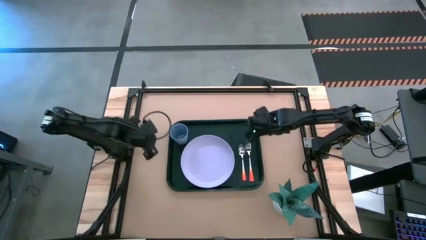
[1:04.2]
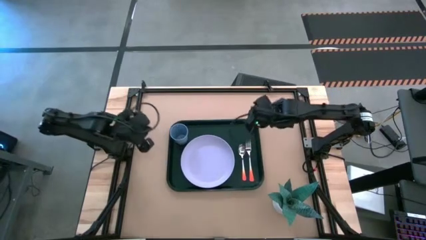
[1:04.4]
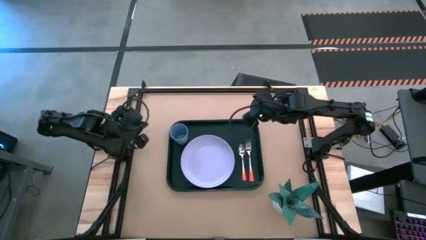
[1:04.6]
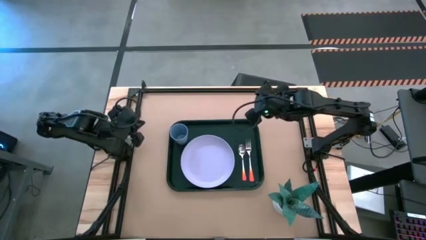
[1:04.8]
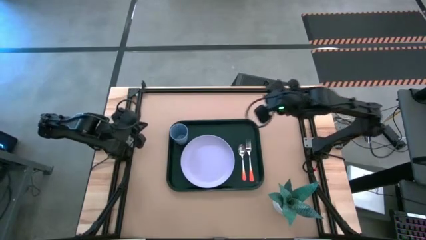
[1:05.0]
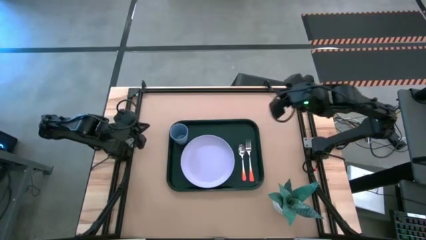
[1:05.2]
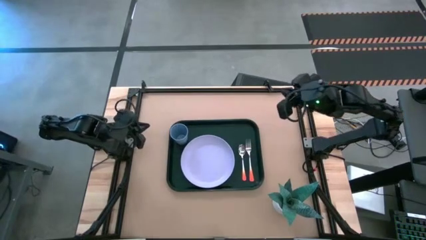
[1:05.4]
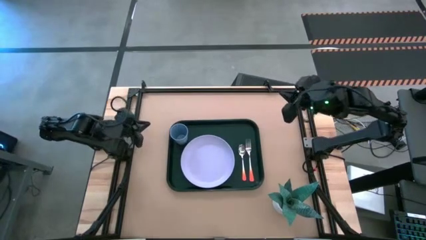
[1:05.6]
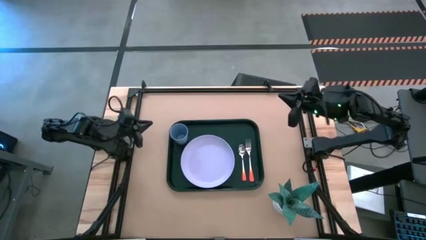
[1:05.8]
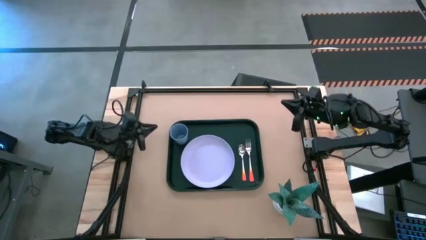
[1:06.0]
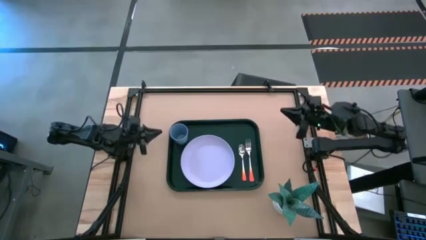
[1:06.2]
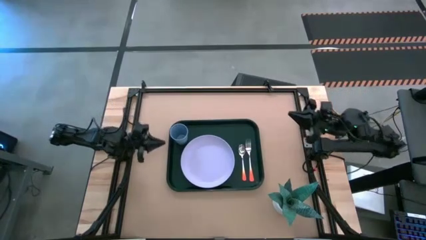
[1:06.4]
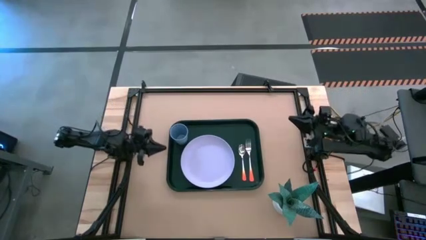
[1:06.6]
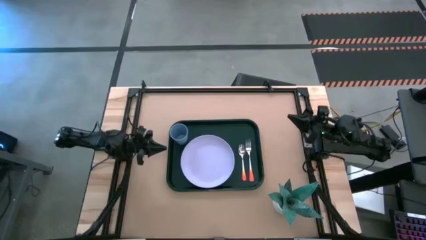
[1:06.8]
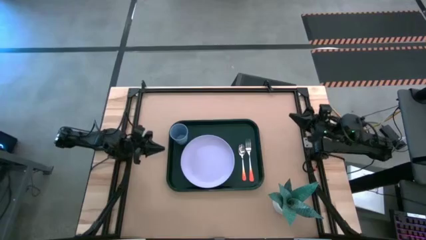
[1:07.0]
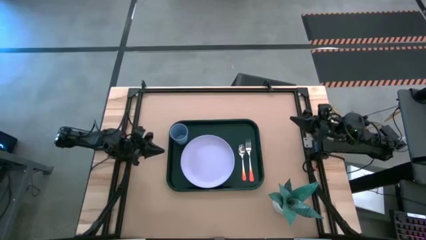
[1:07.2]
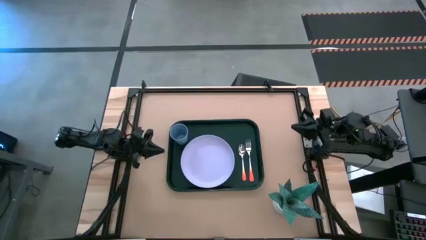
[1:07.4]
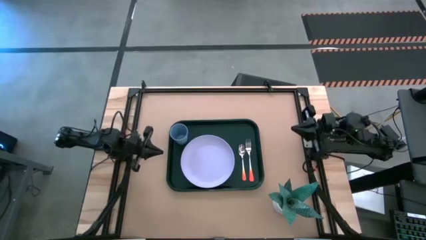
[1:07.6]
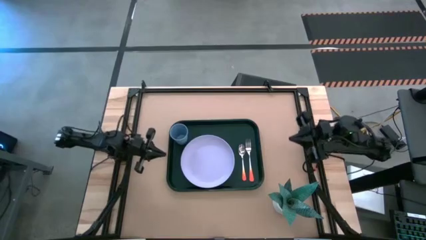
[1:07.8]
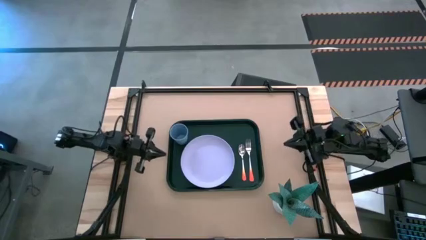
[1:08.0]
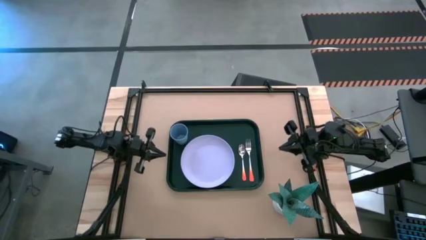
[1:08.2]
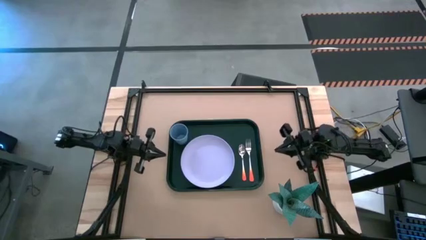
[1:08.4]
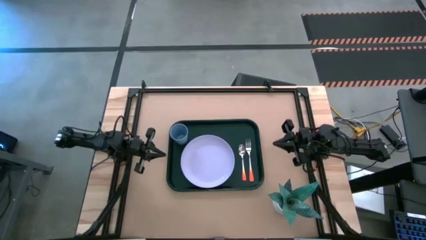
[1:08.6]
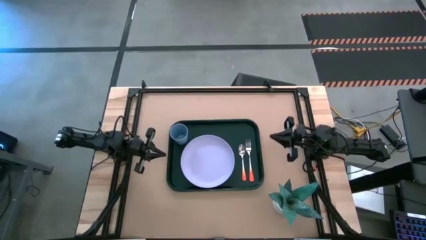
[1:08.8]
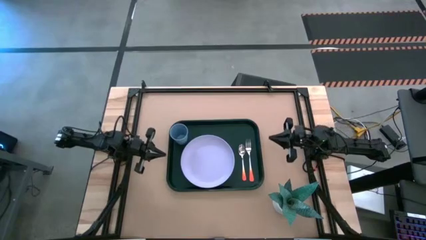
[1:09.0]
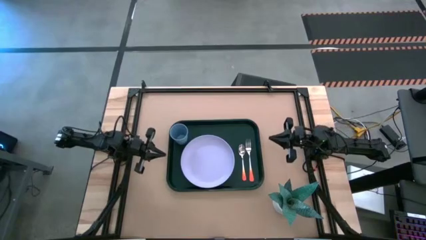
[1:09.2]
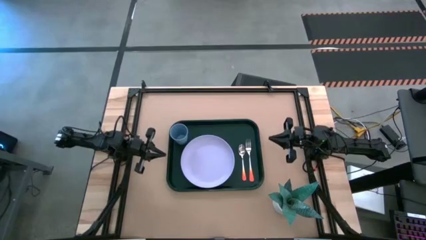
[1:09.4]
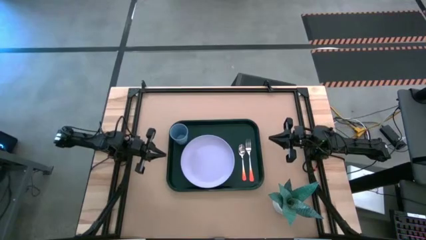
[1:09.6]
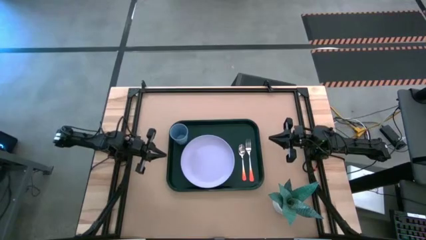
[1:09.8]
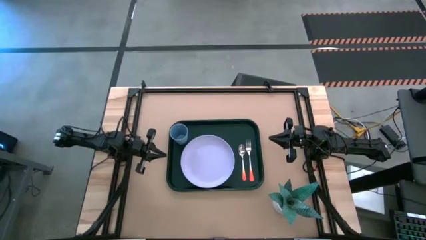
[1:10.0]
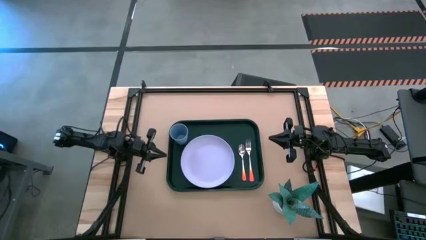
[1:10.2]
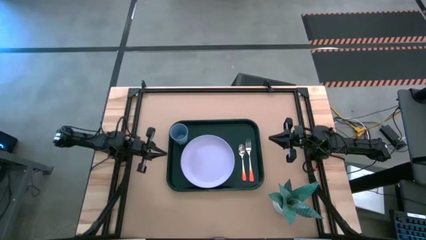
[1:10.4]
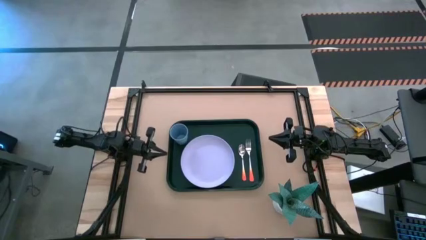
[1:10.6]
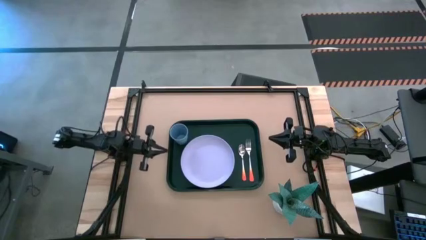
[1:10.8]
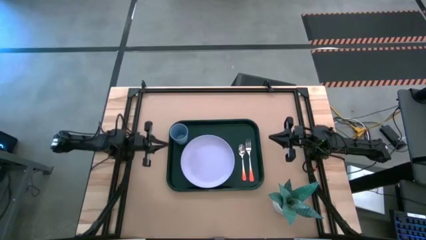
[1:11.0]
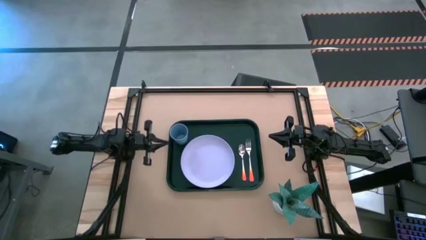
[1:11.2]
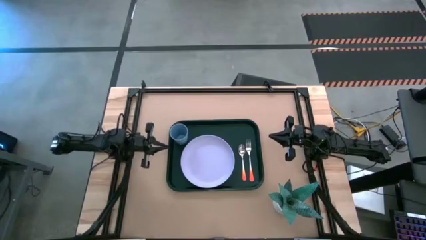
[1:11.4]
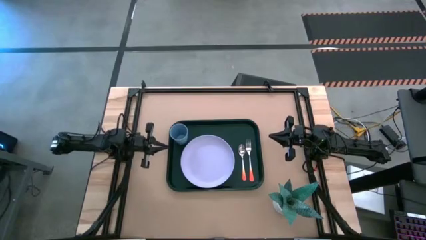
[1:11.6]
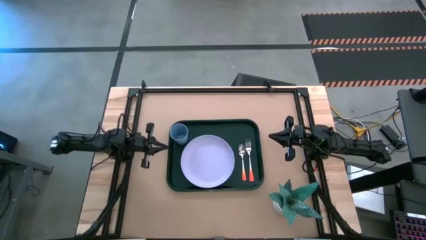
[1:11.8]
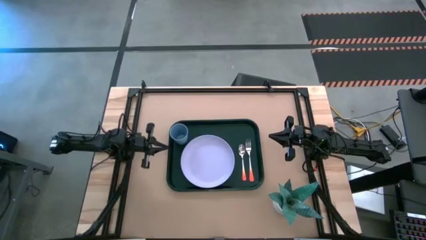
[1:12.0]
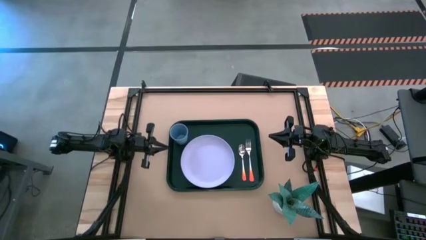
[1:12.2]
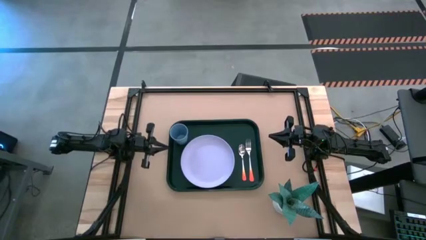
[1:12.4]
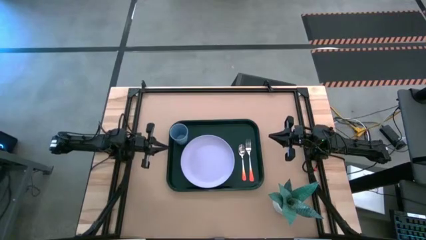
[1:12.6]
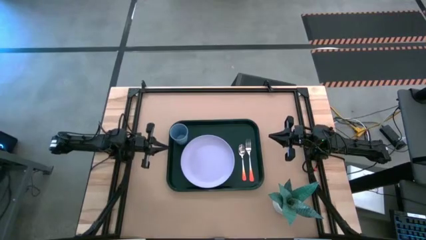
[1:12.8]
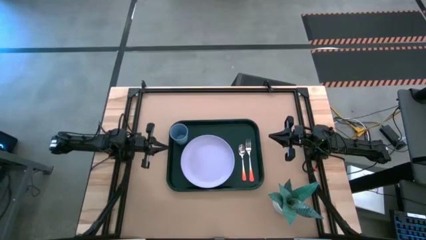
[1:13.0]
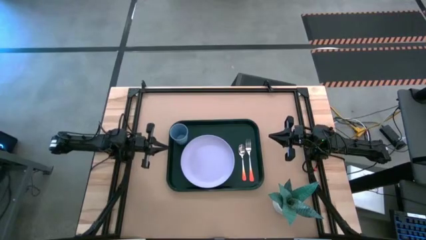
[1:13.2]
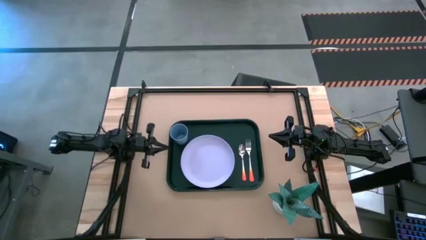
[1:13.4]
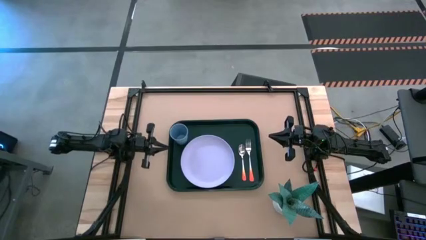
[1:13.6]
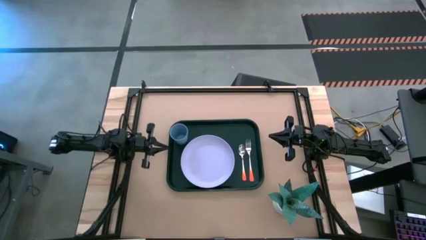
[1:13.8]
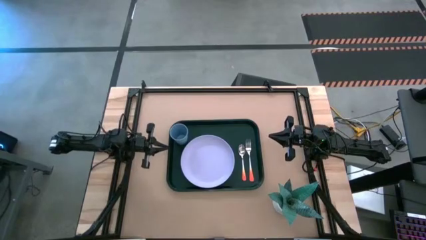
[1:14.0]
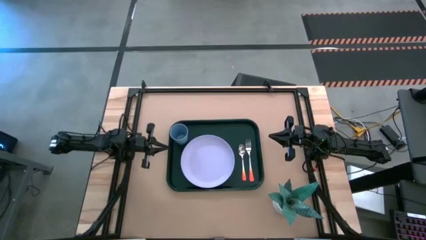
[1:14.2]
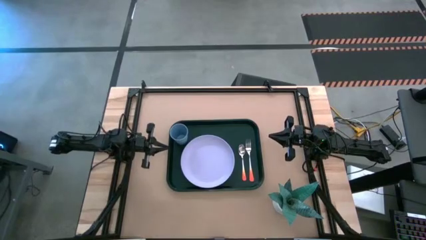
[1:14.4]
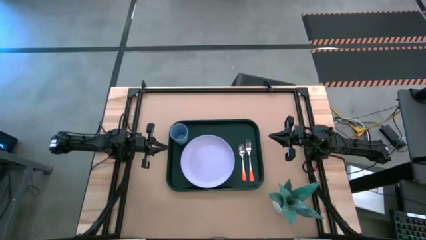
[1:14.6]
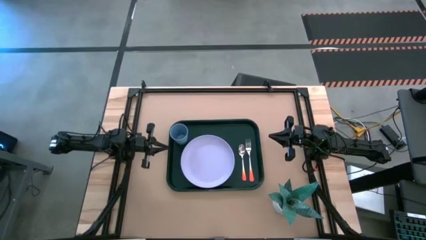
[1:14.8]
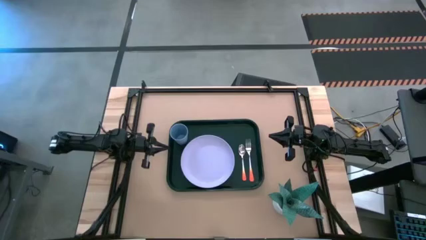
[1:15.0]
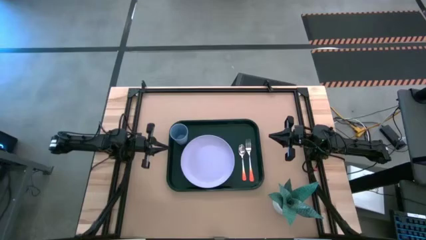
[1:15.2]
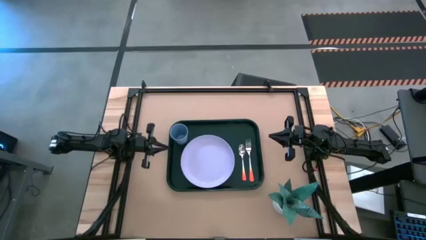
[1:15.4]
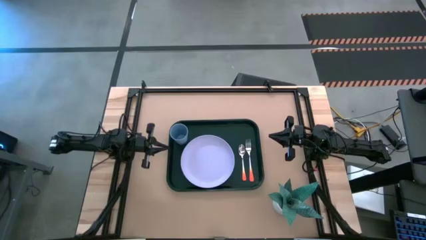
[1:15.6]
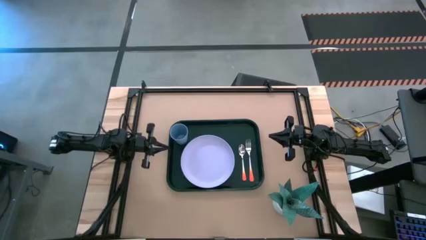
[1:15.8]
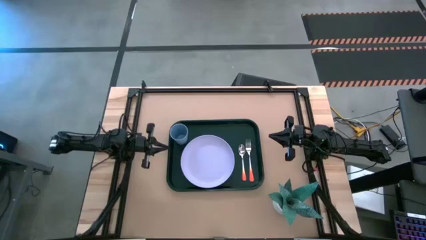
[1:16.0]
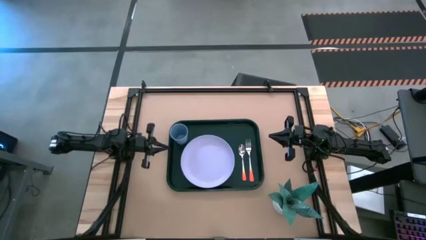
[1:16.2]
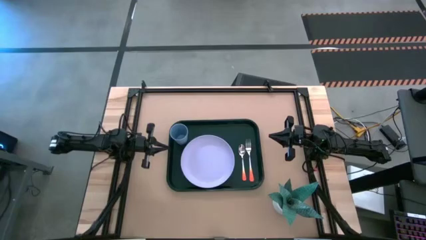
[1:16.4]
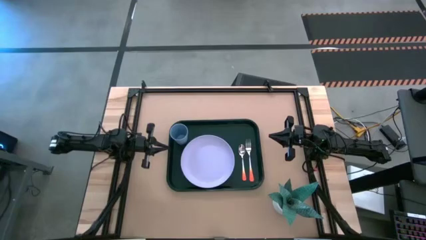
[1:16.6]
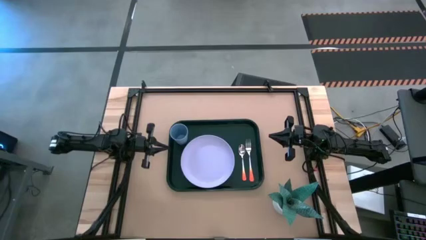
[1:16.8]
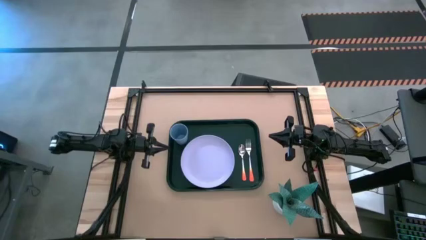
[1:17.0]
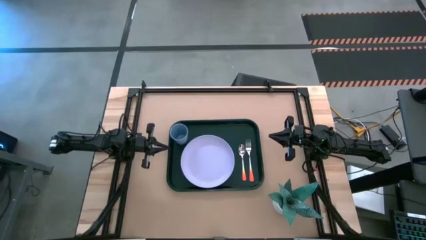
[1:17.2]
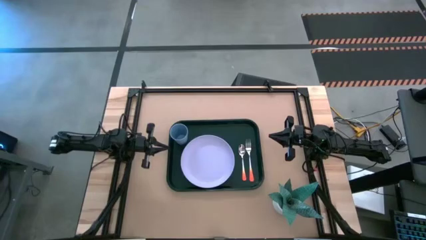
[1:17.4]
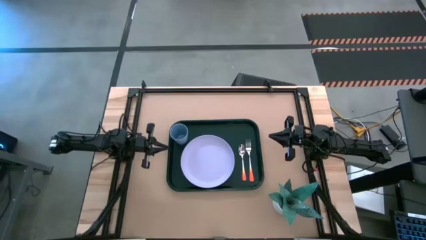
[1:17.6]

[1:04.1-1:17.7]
Task: Pick and place plate/cup/fork/spoon on tray
Return to Home Position
